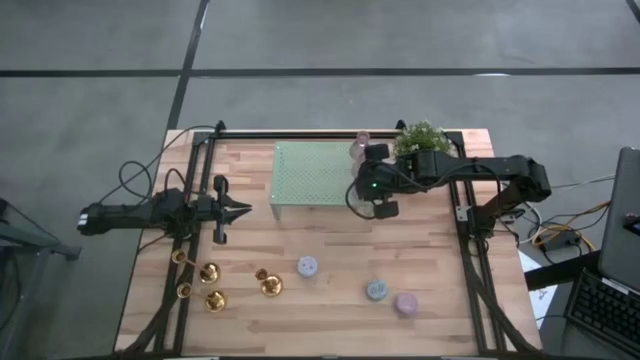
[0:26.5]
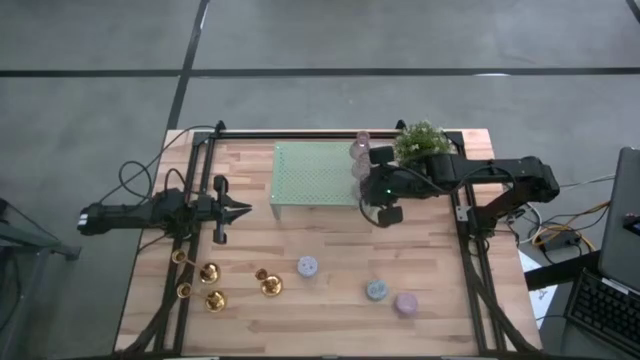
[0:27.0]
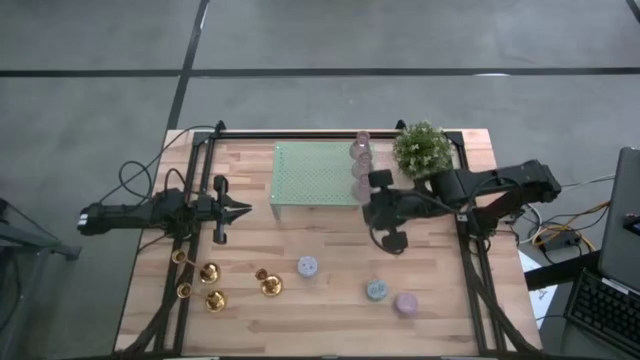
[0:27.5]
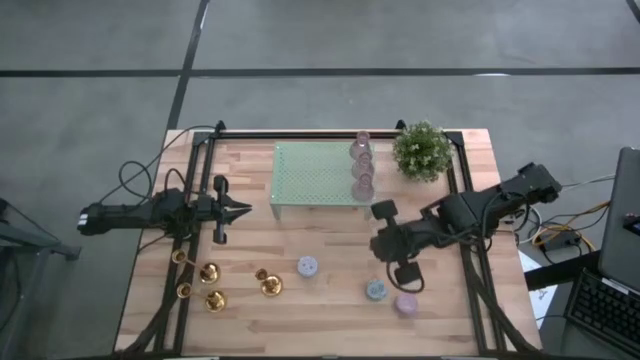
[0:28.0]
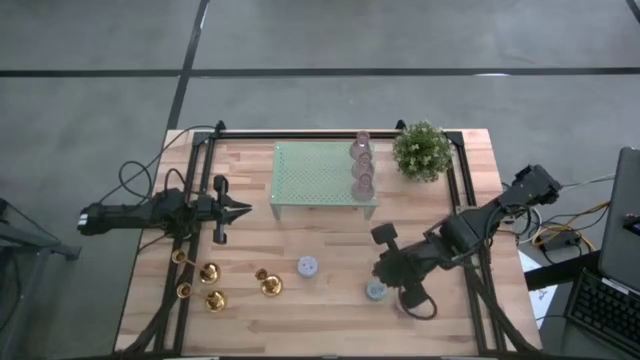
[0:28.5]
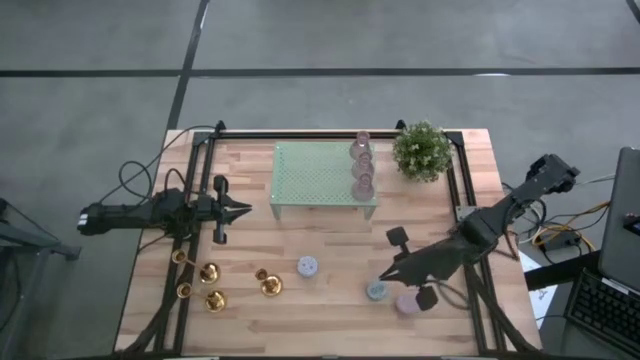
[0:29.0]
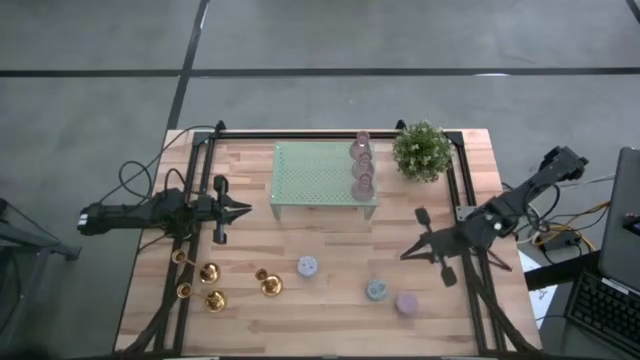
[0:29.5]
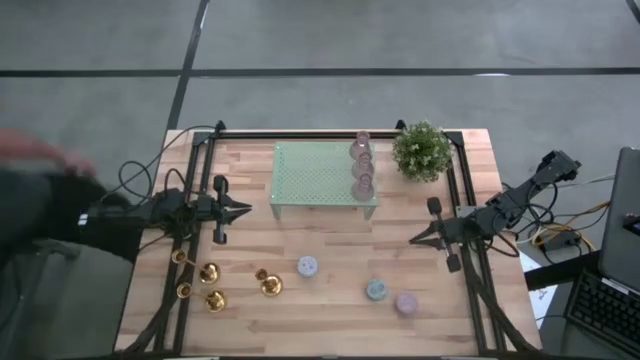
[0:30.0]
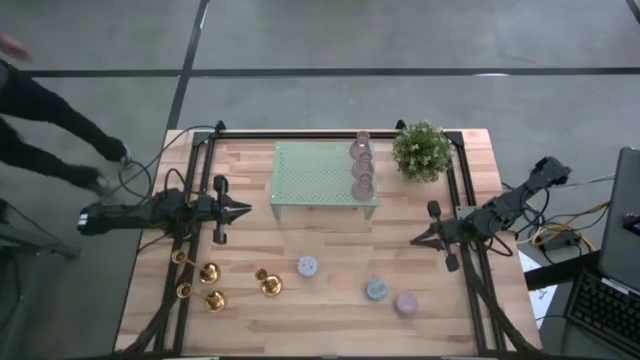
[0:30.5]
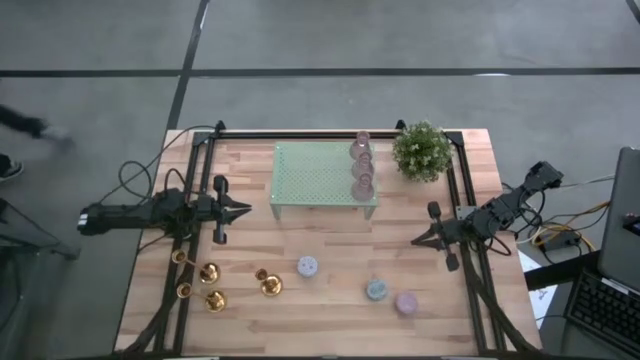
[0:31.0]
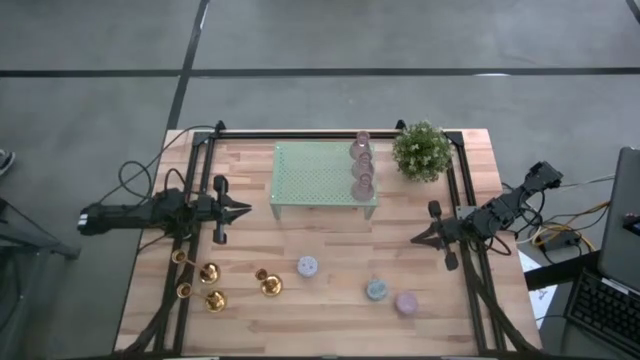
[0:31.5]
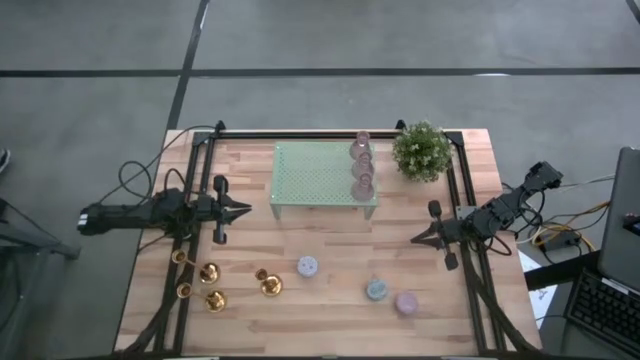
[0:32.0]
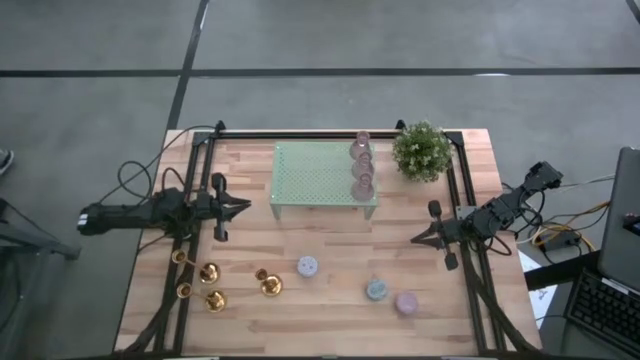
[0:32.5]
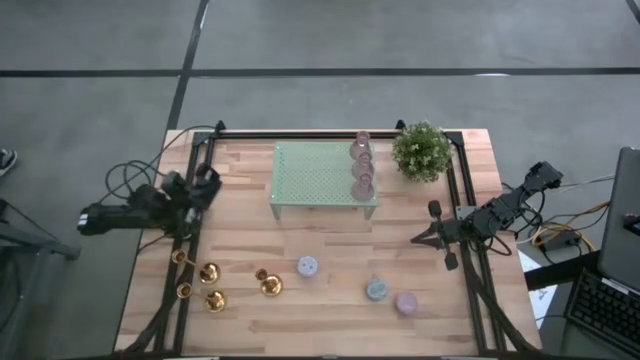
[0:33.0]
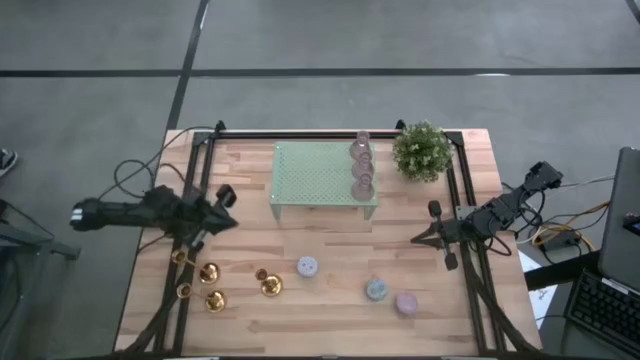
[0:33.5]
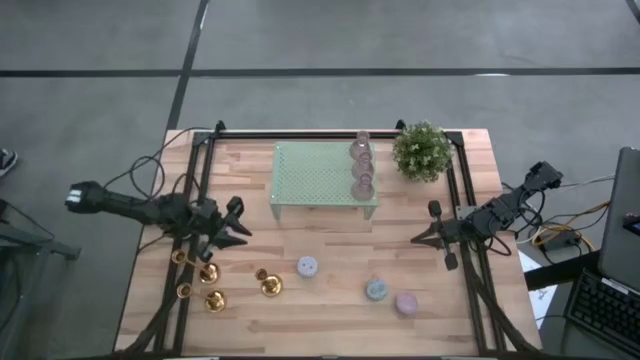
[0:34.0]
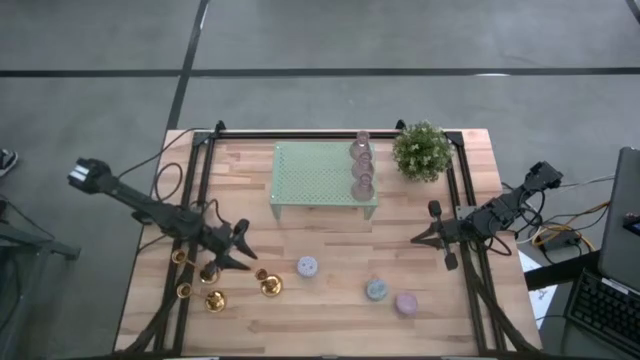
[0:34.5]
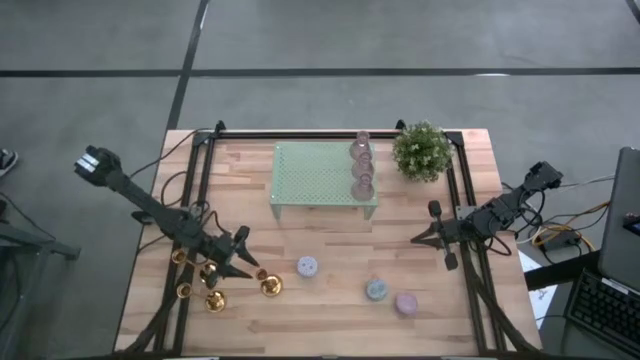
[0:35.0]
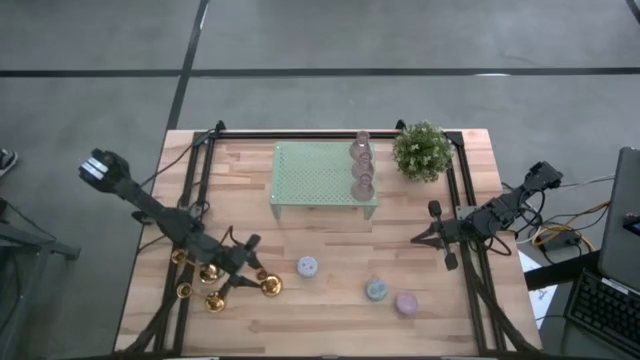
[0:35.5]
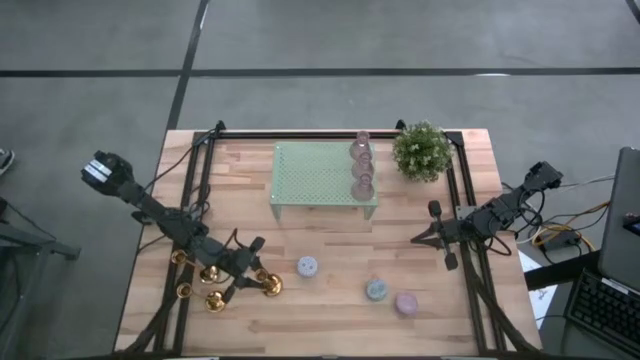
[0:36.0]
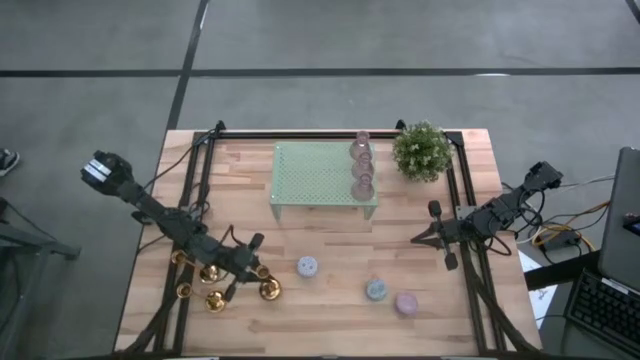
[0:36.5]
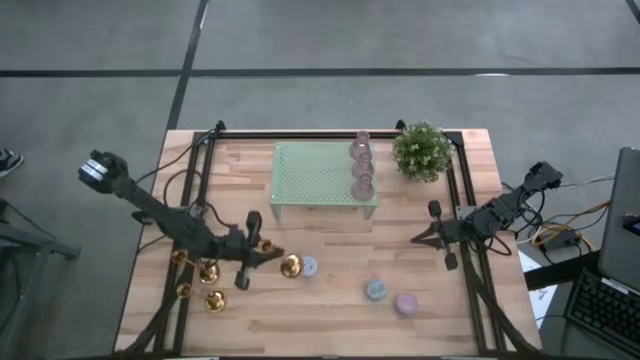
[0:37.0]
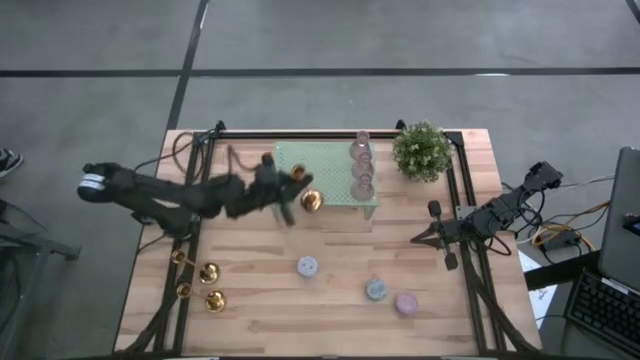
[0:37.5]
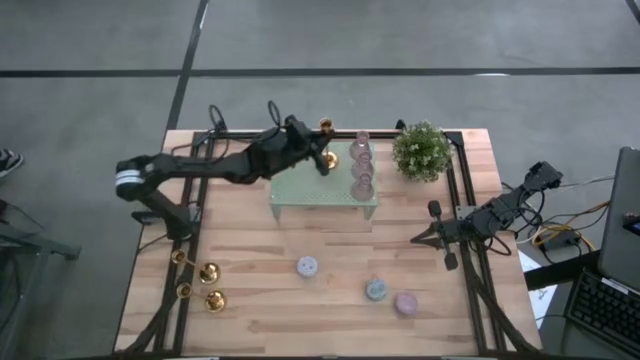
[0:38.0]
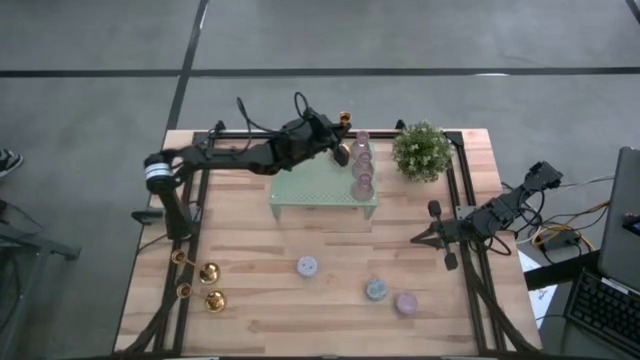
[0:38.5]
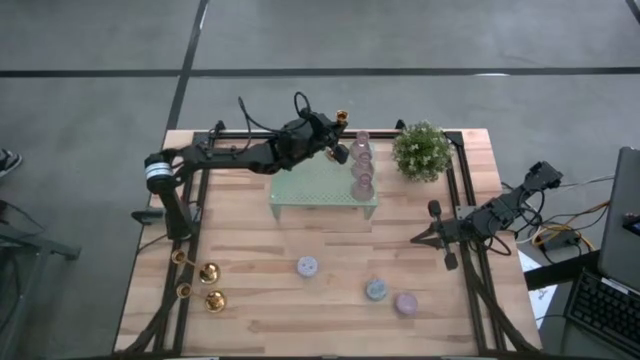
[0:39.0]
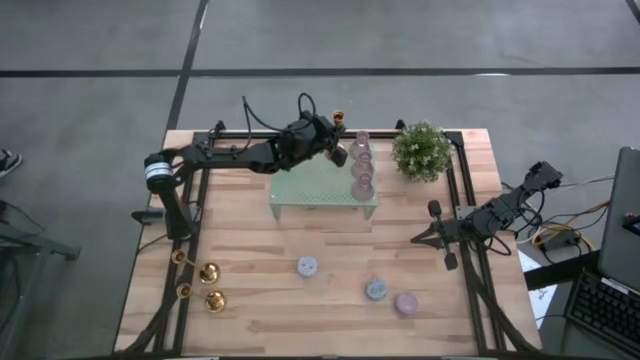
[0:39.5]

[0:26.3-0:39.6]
Task: Pick & Place candle stick holders
Put the bottom right gold candle holder on the shelf

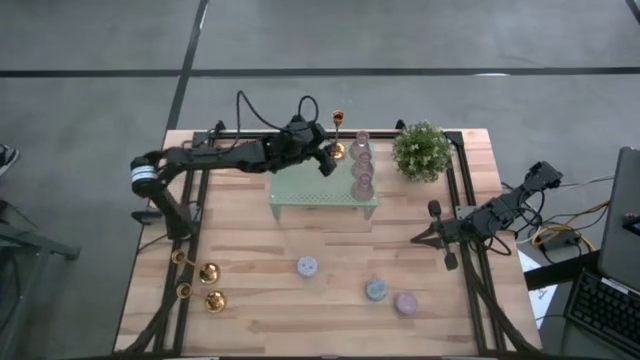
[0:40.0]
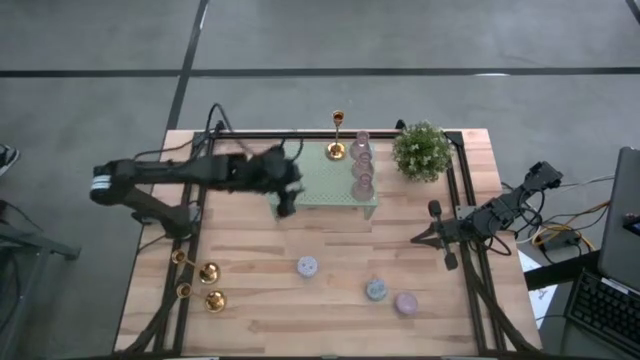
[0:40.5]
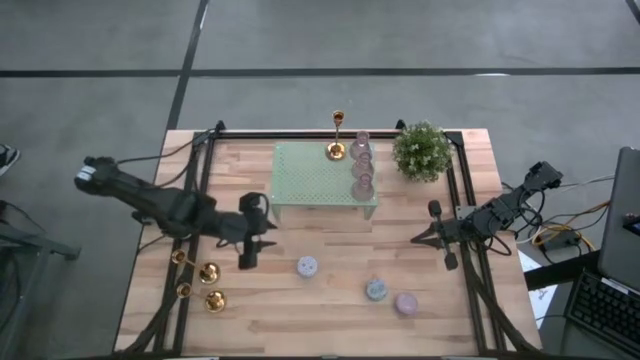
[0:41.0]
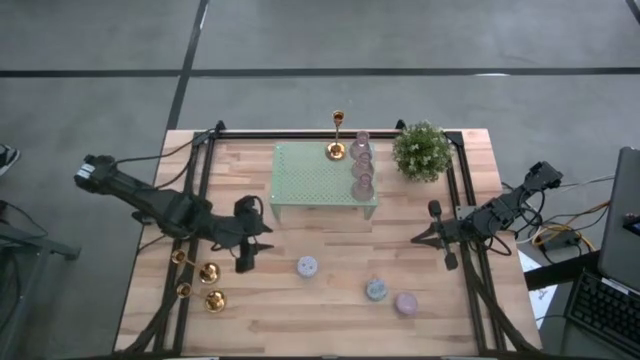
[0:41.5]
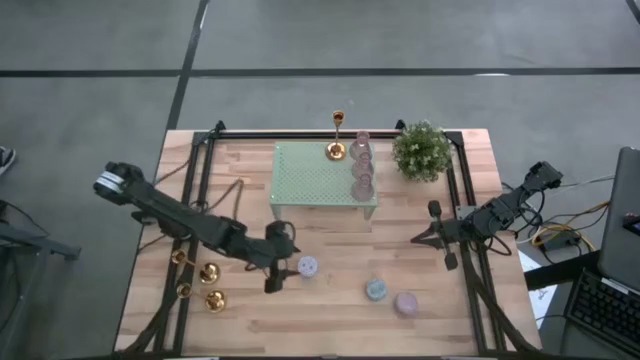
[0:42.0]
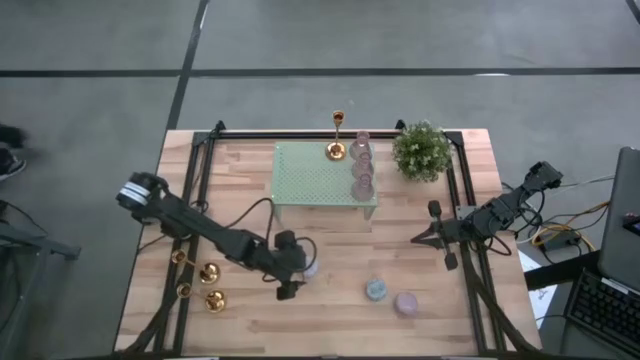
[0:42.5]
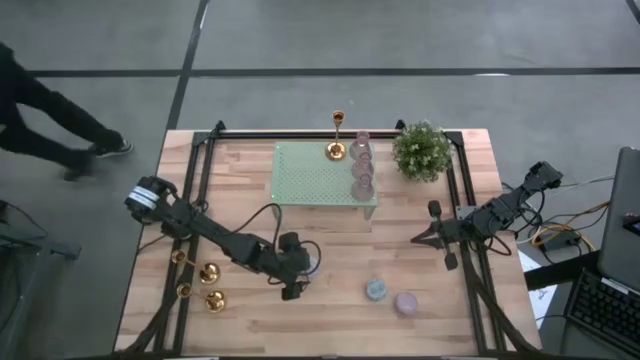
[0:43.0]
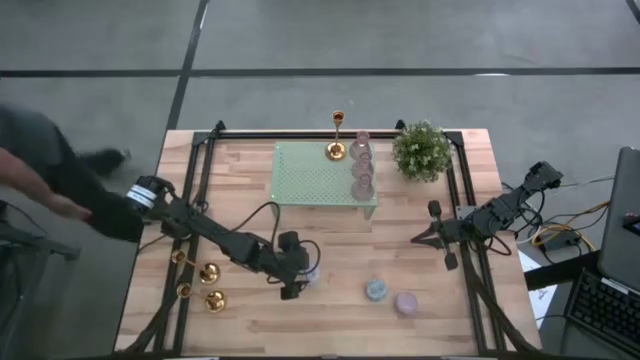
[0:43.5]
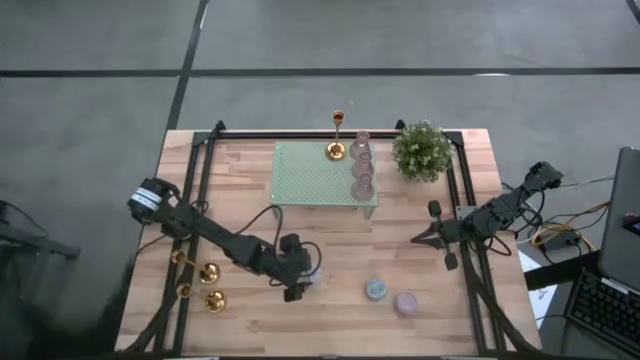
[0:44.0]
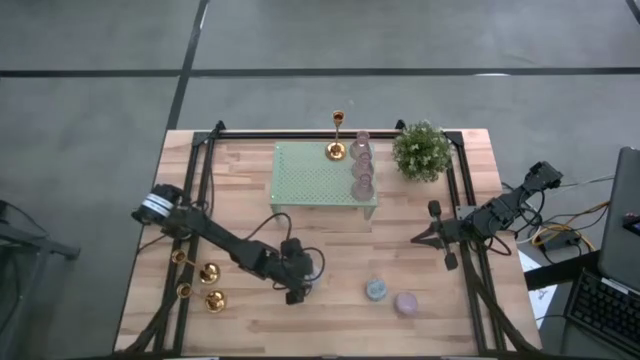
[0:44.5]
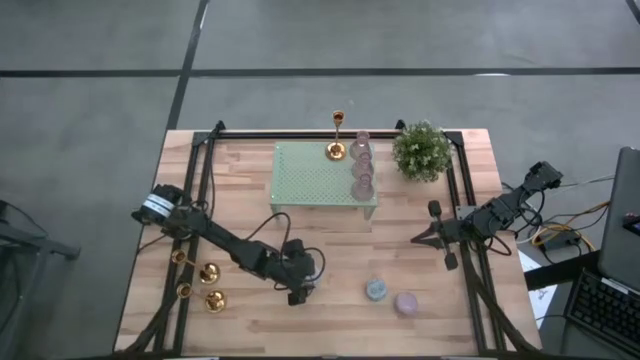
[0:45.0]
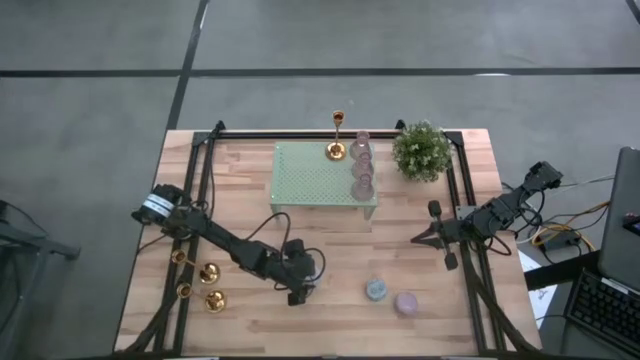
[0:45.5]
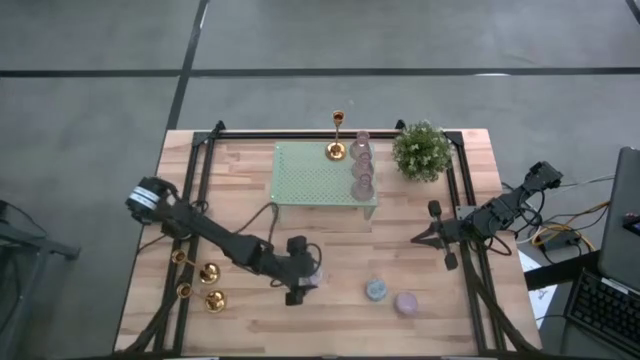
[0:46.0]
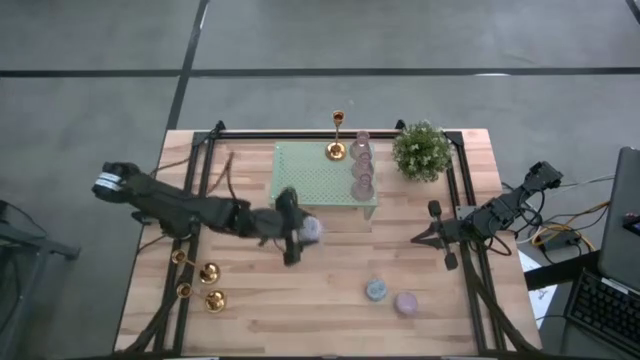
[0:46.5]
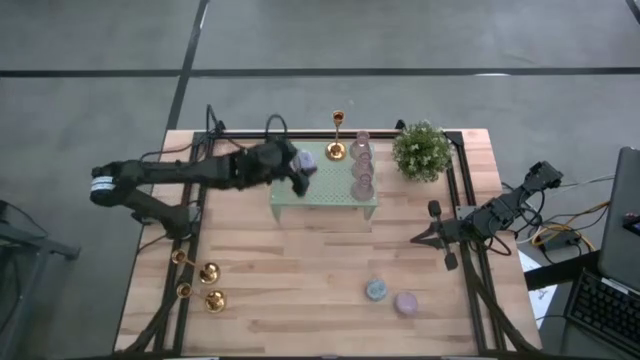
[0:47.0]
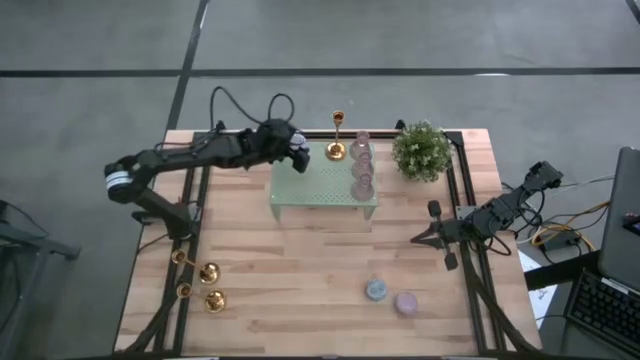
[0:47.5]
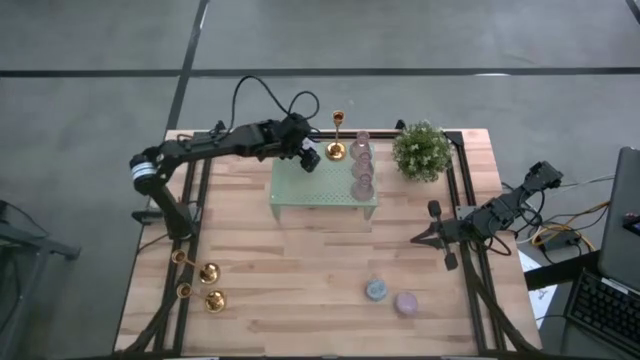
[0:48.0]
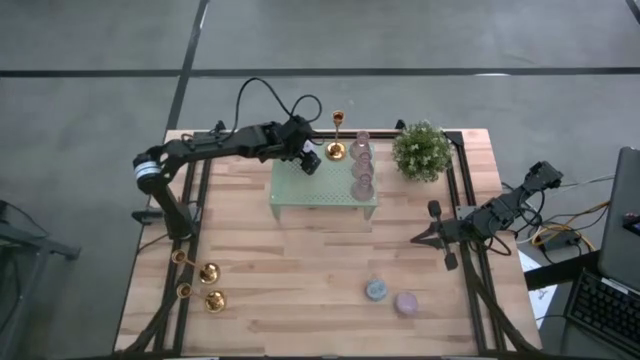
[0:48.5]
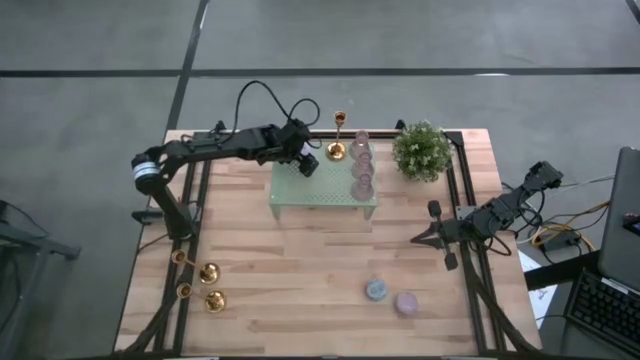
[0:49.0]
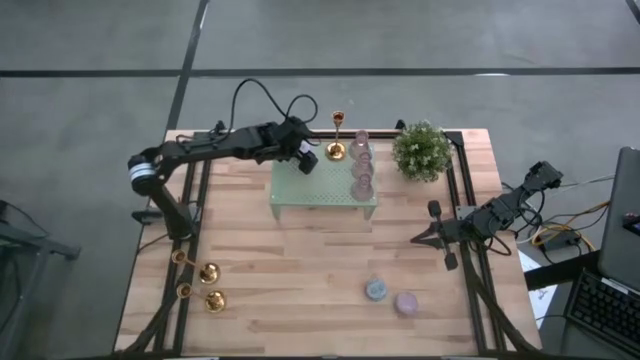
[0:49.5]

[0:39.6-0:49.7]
Put the white scented candle on the shelf
